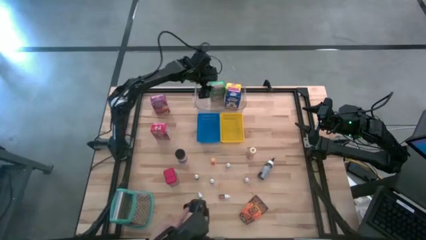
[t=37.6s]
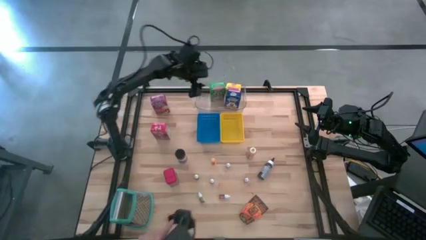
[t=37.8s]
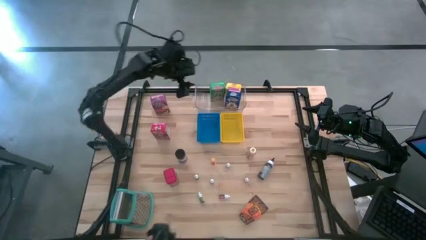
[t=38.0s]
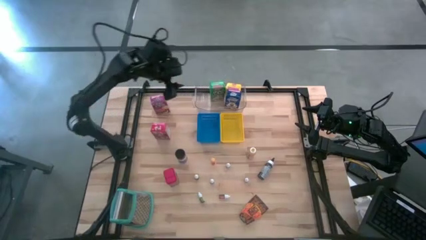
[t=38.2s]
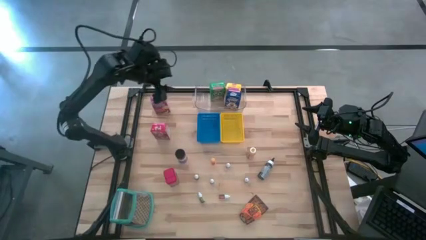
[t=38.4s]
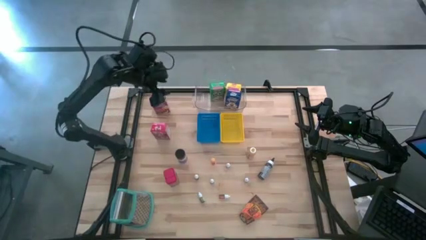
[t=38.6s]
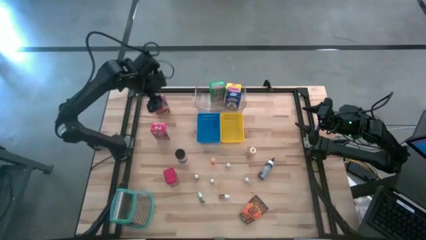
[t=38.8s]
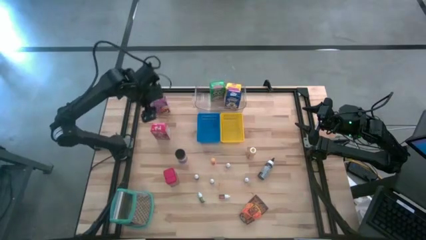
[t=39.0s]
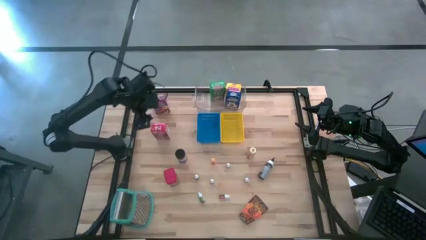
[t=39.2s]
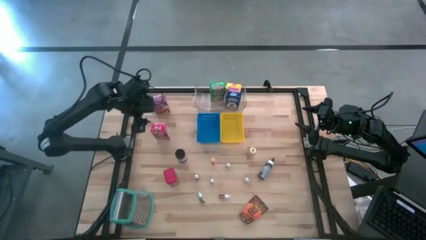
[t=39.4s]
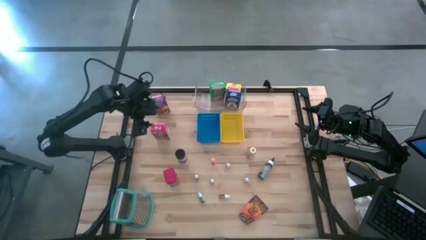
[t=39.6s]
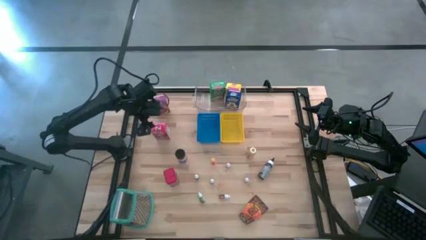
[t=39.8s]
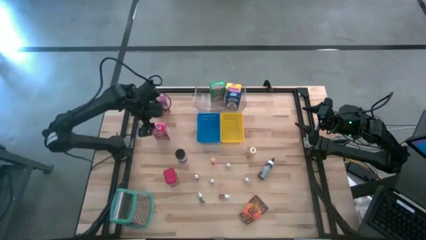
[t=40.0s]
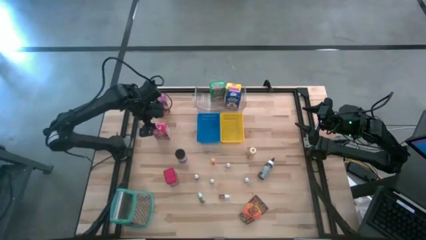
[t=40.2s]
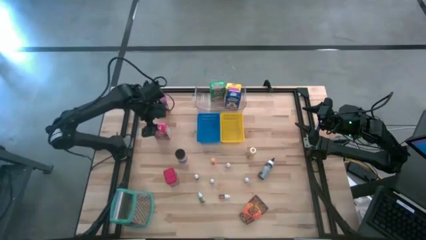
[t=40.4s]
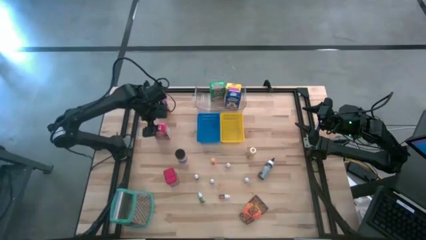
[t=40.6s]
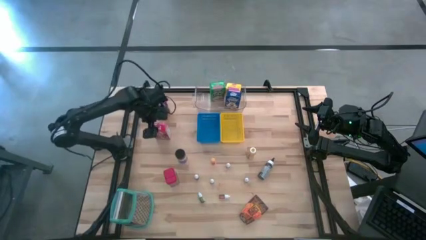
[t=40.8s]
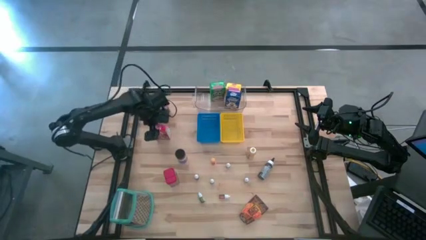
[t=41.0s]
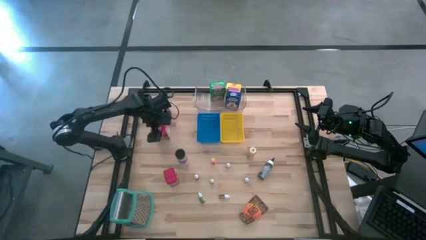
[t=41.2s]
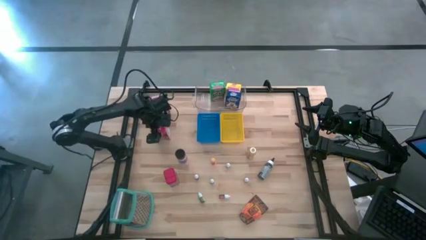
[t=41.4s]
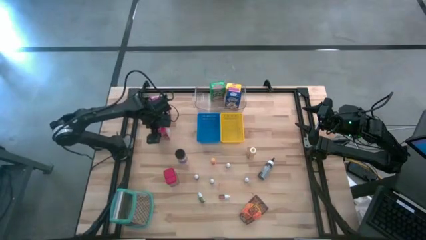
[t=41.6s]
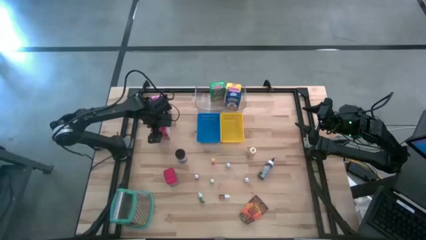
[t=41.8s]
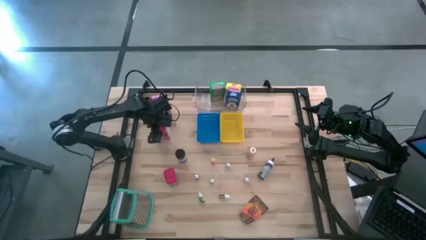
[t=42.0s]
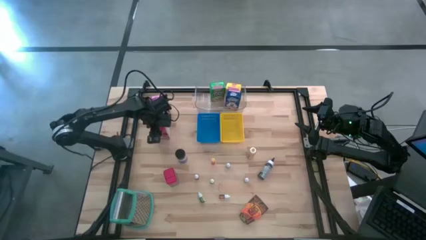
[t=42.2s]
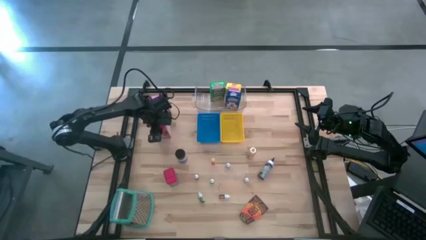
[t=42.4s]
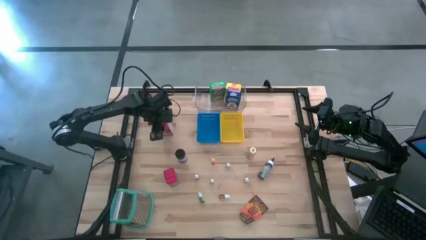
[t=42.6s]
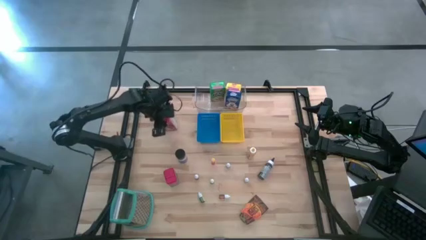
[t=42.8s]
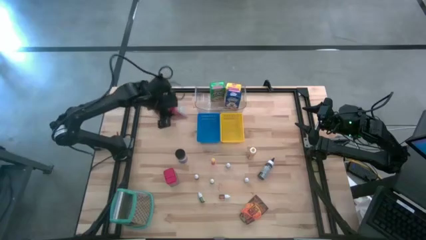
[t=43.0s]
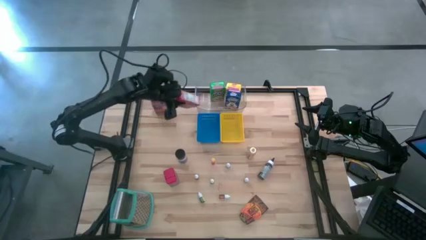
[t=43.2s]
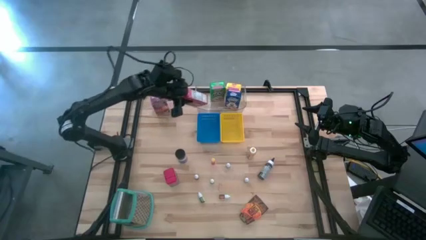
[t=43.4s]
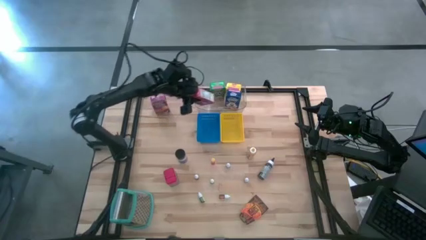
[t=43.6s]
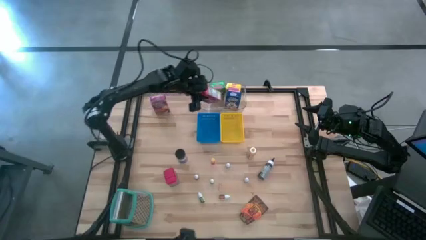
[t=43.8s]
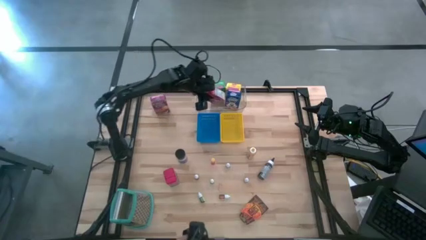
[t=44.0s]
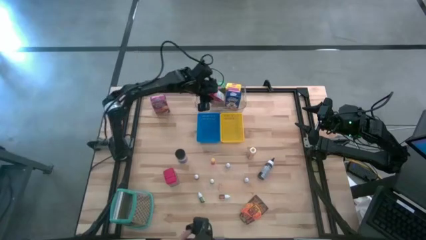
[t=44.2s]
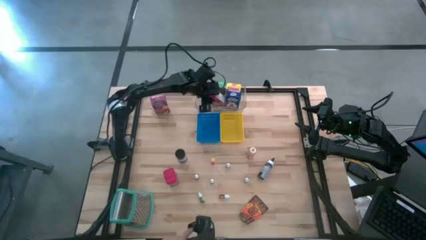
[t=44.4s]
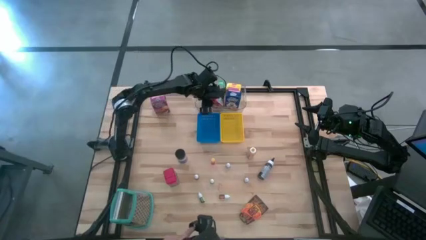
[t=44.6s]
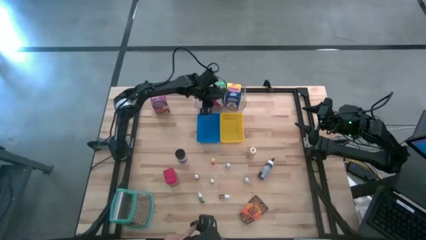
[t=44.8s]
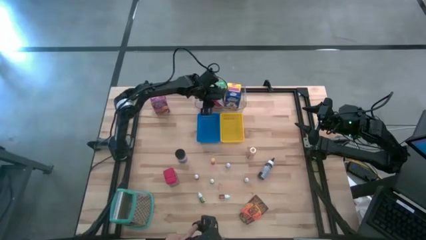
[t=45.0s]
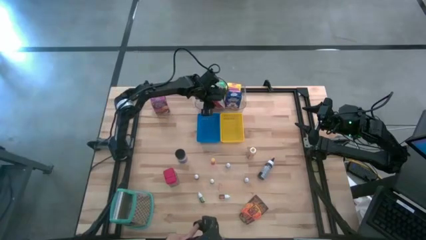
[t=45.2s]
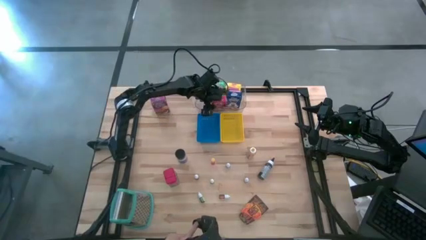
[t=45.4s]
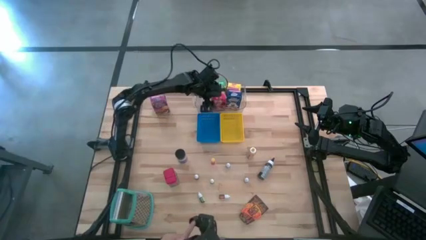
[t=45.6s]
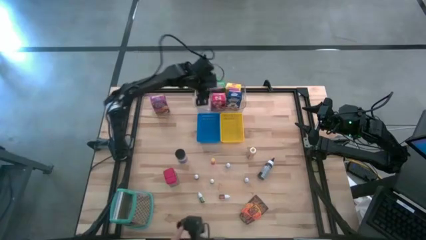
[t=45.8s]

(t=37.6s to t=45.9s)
Task: Pick & Place Kitchen Items
Put the red cereal box into the transparent bin

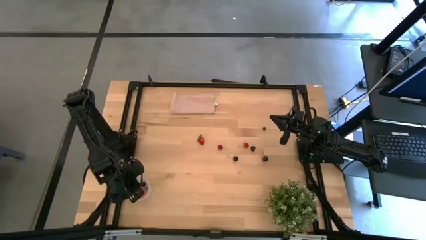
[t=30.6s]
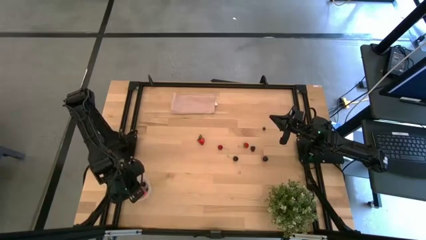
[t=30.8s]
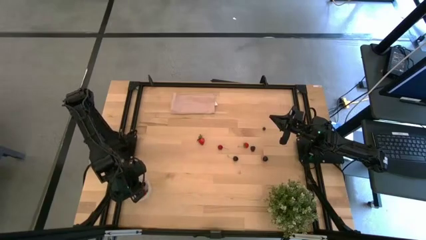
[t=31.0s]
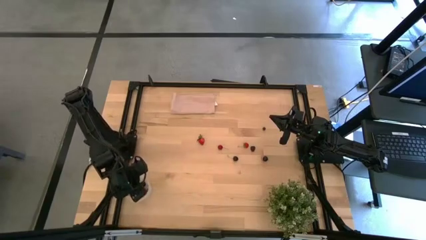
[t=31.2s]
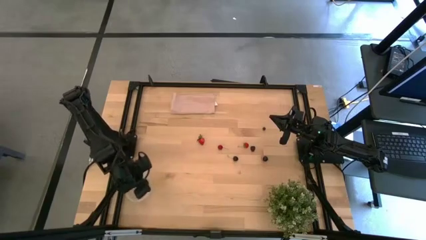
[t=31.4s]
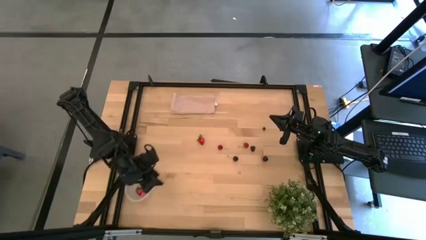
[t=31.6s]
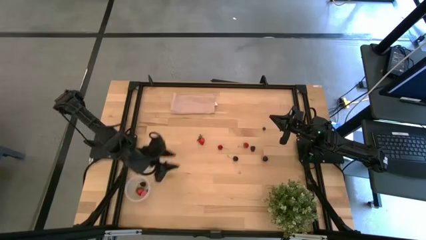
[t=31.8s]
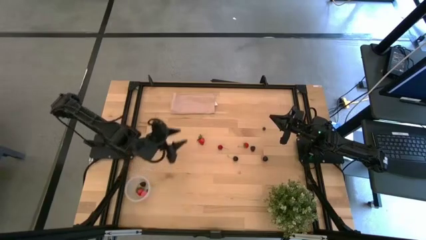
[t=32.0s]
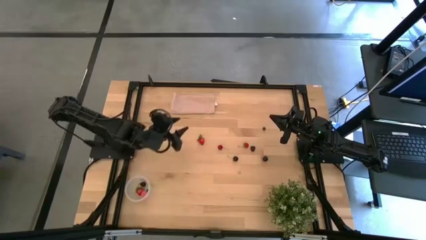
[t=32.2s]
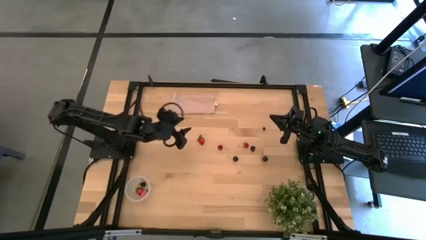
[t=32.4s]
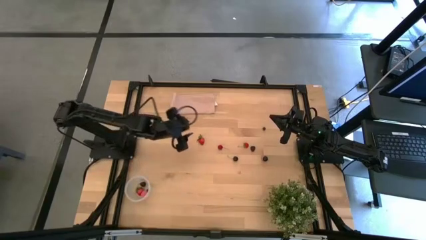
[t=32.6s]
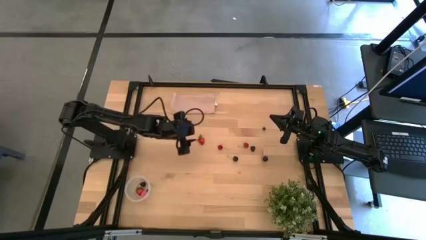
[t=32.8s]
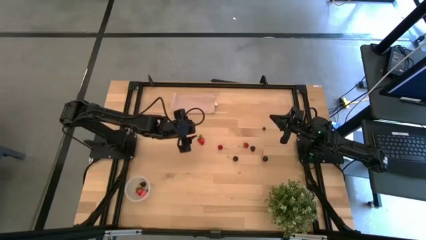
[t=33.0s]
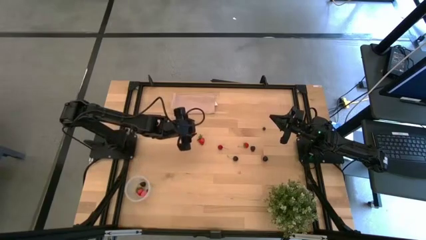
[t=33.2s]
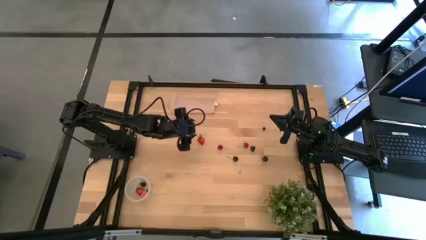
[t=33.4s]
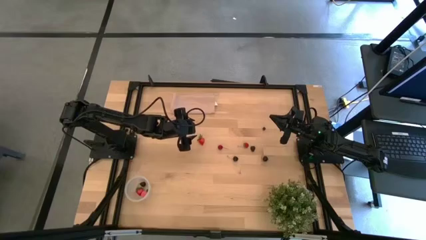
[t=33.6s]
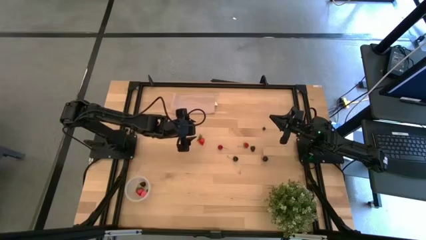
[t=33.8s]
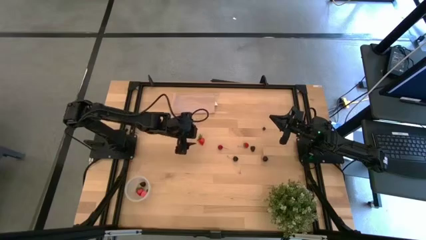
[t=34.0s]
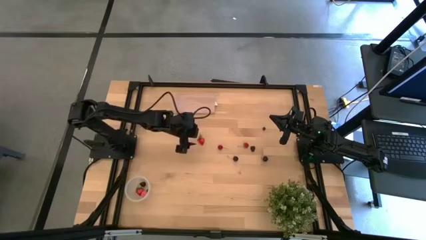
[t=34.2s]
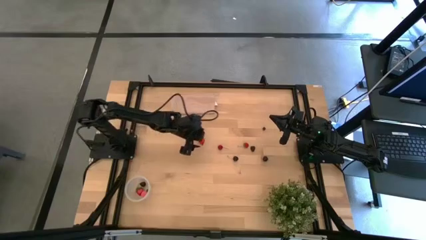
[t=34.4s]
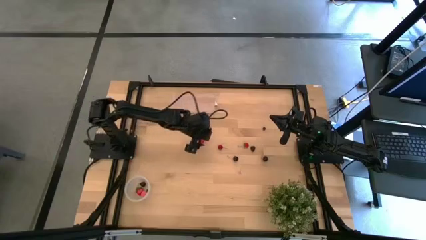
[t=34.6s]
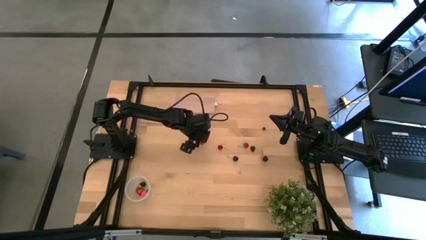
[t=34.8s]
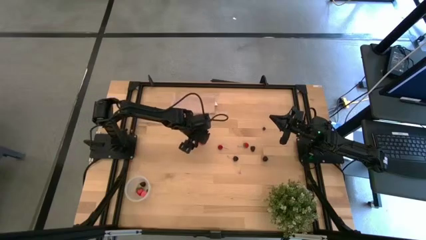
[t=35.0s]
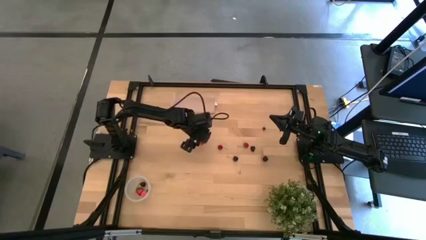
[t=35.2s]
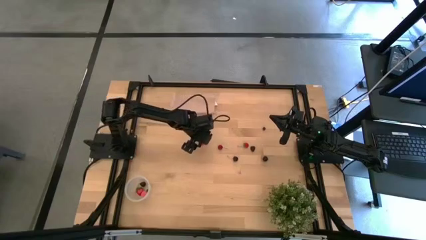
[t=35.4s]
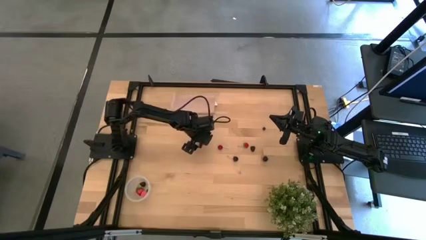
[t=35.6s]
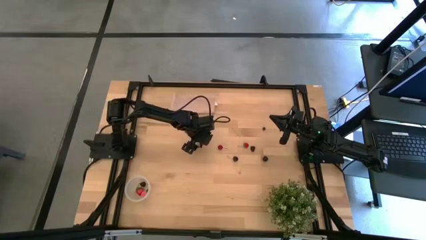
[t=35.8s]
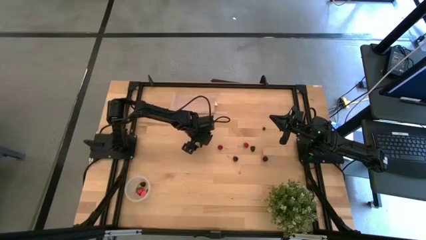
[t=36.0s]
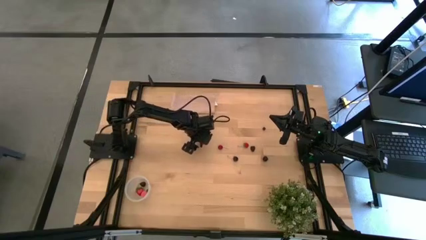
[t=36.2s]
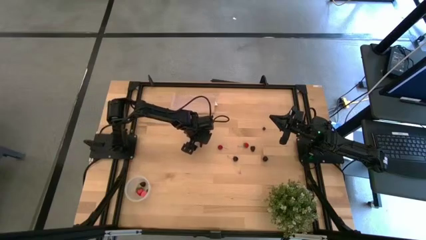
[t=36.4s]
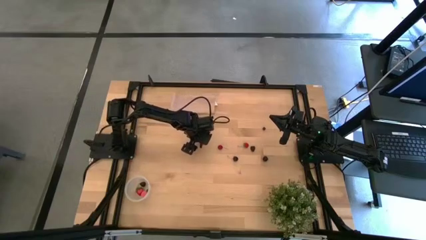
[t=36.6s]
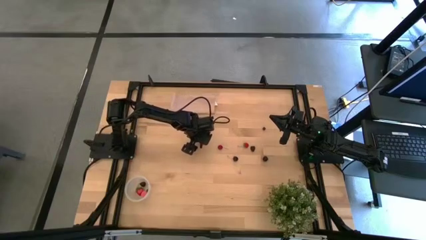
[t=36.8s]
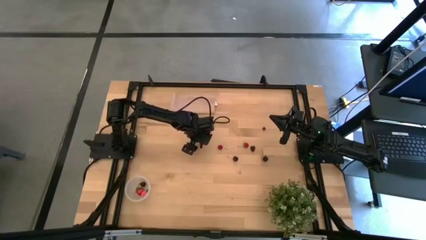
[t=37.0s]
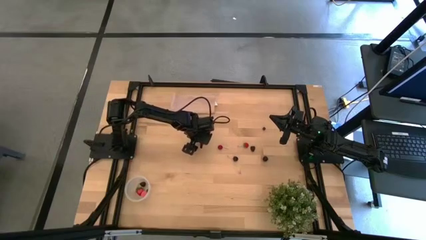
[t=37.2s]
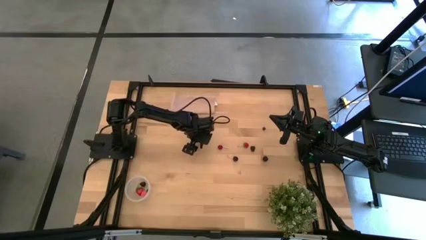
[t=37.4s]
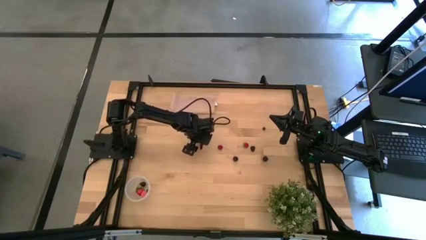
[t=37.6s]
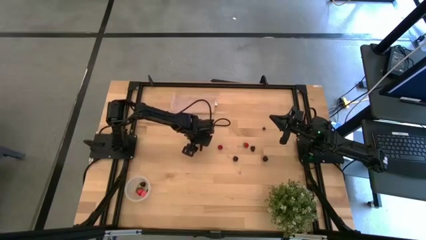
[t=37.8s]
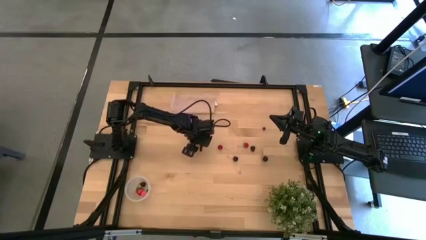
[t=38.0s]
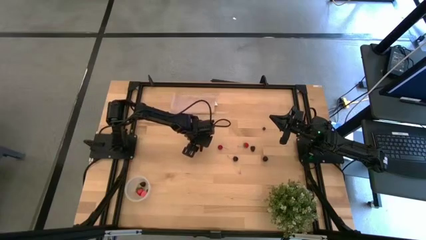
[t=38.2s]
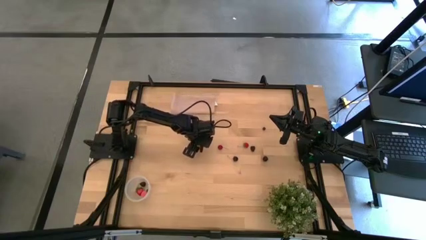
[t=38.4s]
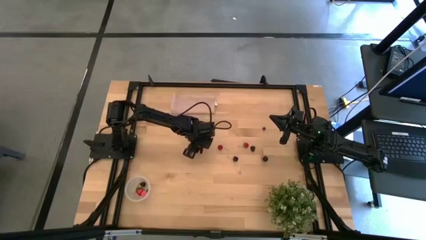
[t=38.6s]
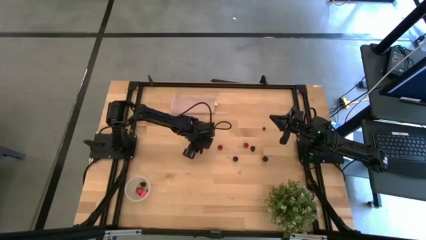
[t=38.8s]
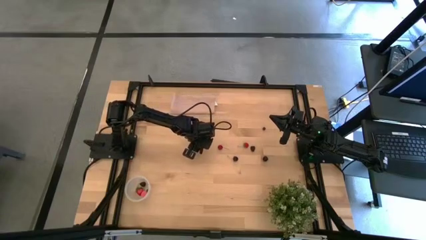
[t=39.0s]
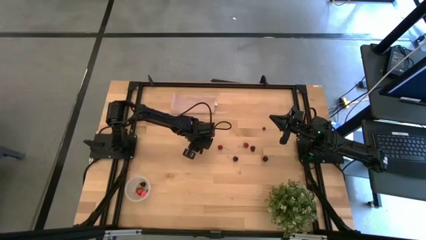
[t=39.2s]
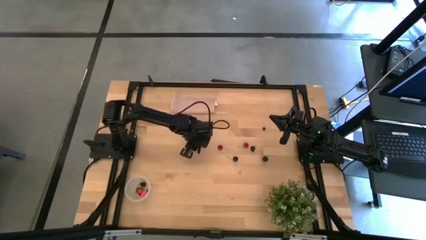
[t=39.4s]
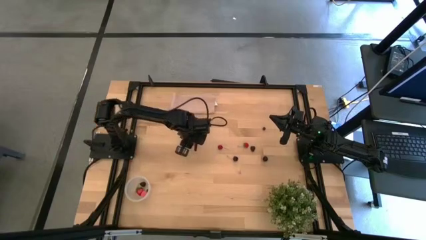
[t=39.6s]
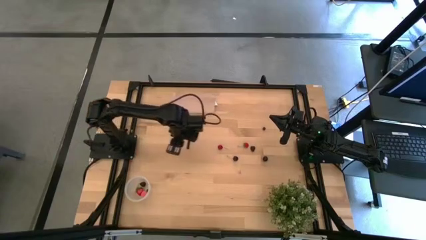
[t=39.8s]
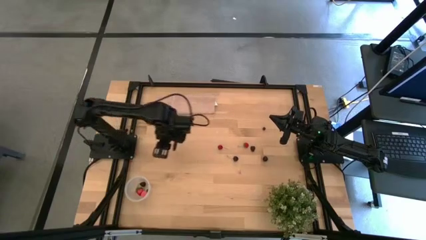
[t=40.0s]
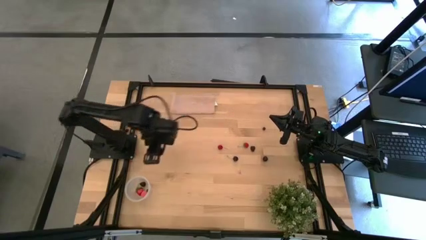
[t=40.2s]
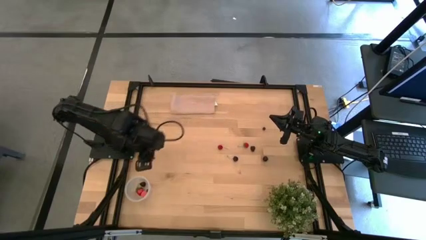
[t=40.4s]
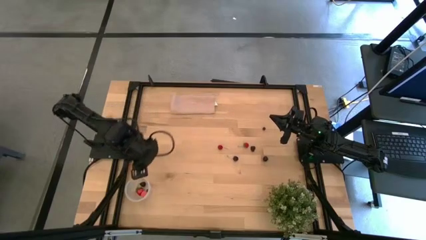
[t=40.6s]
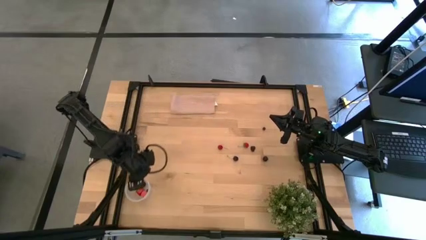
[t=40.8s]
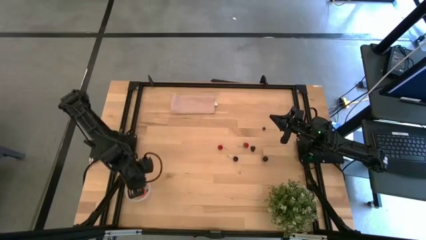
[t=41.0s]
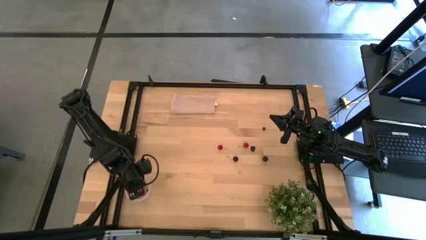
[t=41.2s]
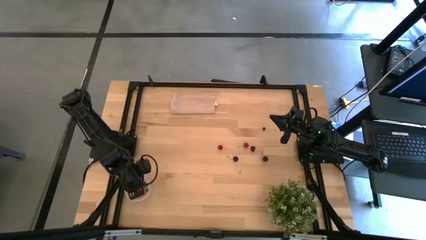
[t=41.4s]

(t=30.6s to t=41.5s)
Task: Pick and placing Produce into tupperware
Put the left strawberry into the transparent bin
